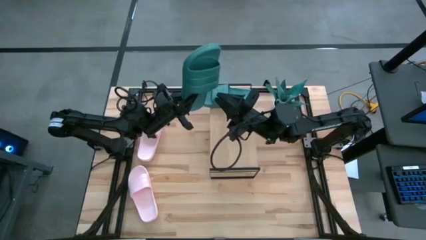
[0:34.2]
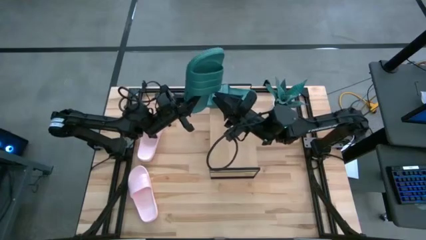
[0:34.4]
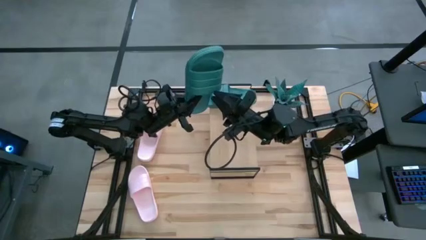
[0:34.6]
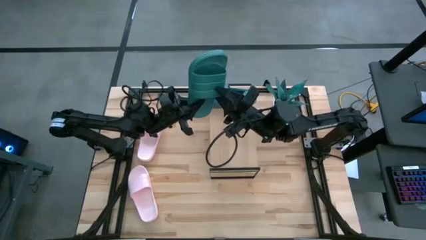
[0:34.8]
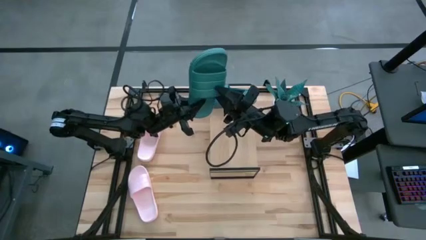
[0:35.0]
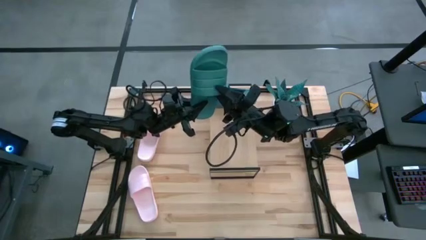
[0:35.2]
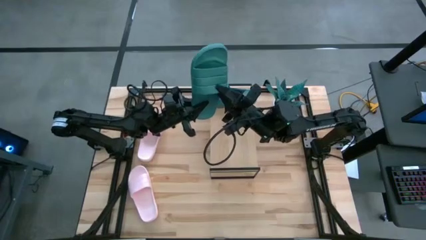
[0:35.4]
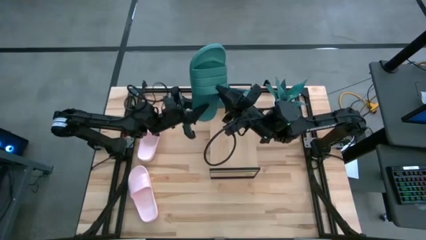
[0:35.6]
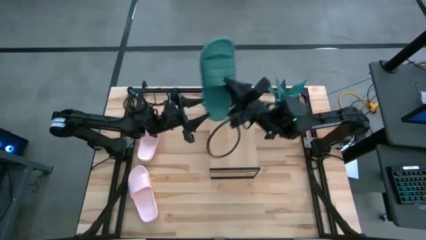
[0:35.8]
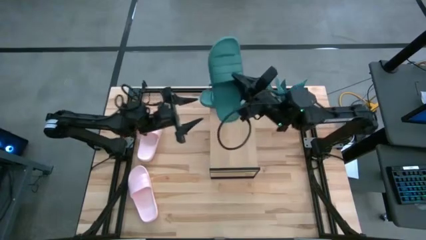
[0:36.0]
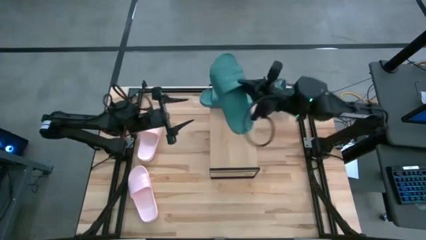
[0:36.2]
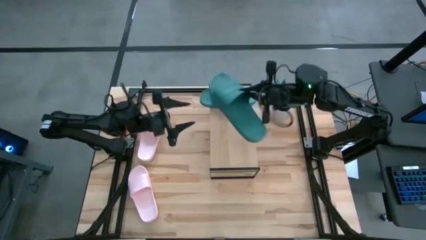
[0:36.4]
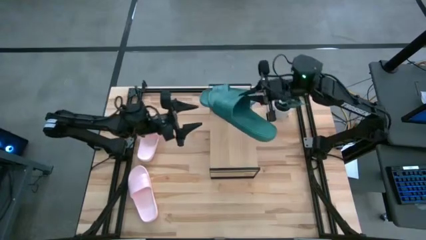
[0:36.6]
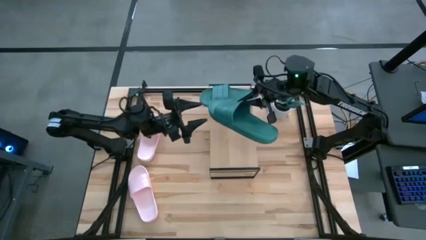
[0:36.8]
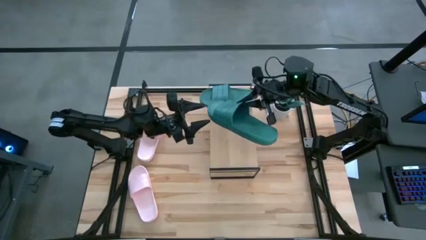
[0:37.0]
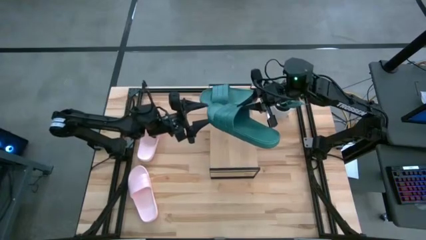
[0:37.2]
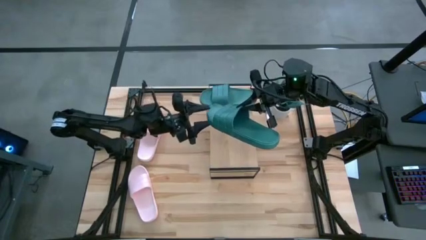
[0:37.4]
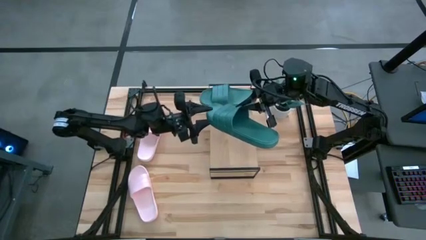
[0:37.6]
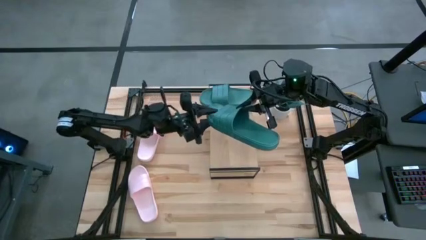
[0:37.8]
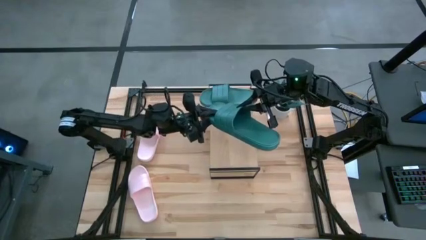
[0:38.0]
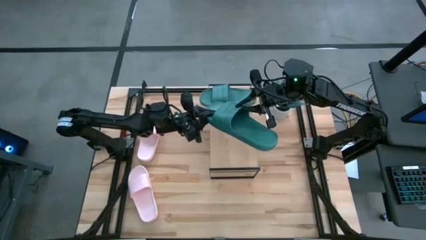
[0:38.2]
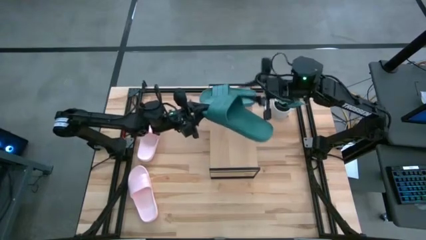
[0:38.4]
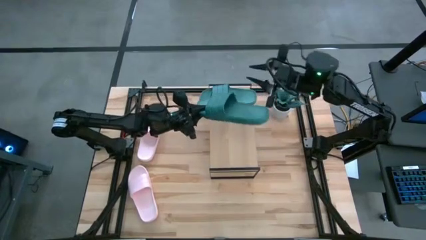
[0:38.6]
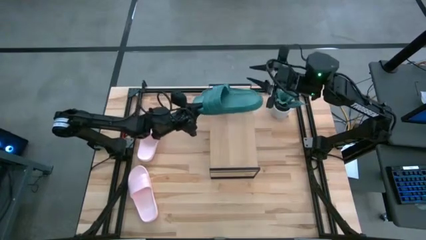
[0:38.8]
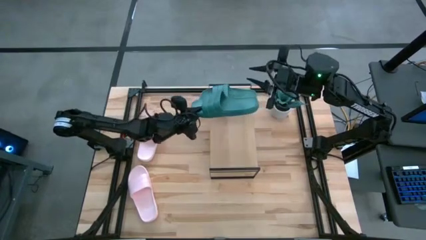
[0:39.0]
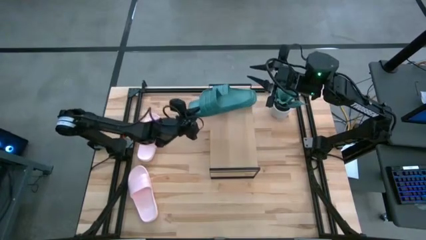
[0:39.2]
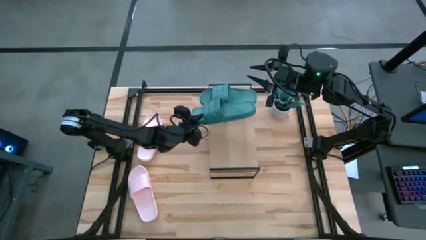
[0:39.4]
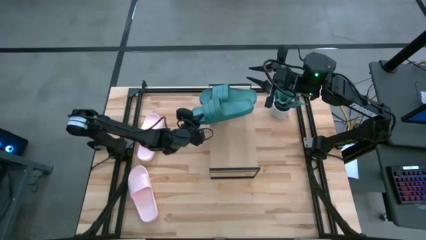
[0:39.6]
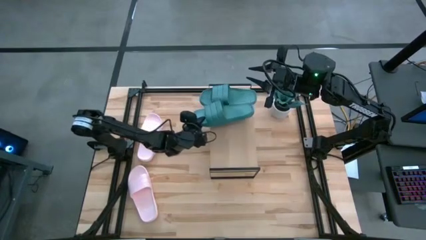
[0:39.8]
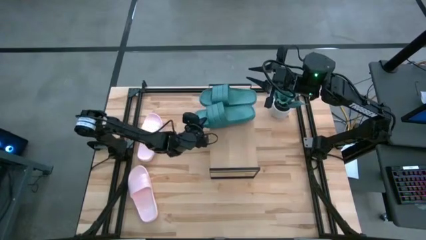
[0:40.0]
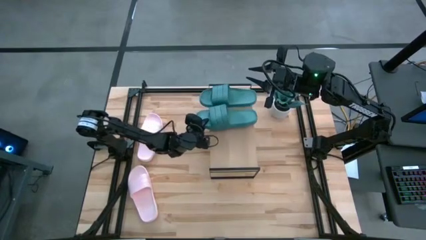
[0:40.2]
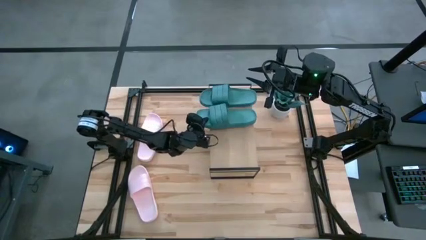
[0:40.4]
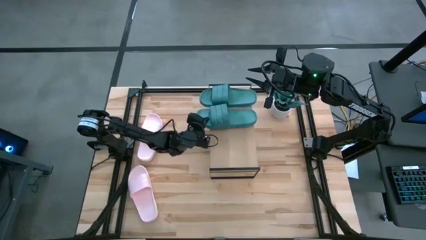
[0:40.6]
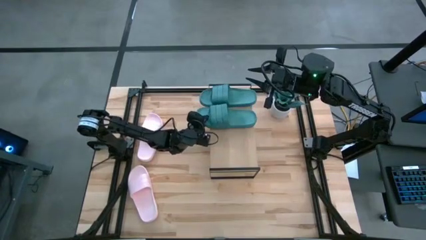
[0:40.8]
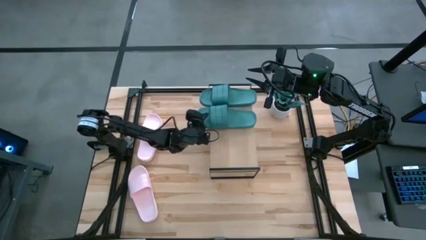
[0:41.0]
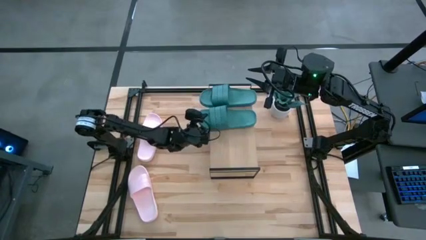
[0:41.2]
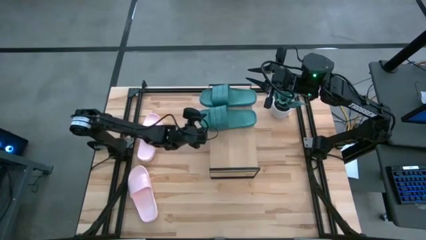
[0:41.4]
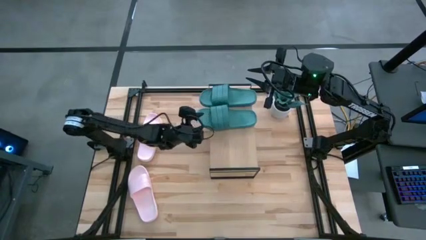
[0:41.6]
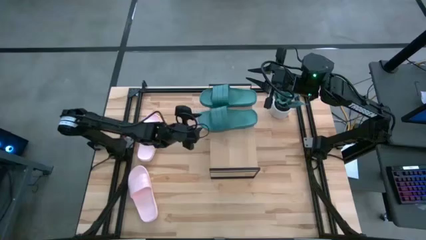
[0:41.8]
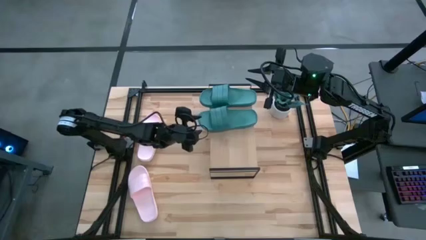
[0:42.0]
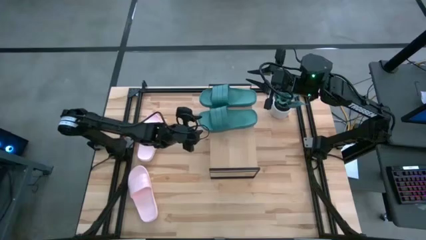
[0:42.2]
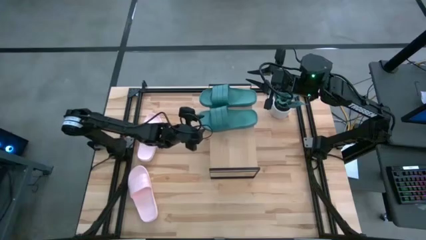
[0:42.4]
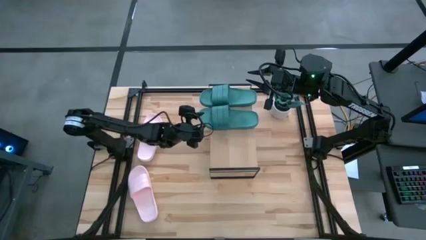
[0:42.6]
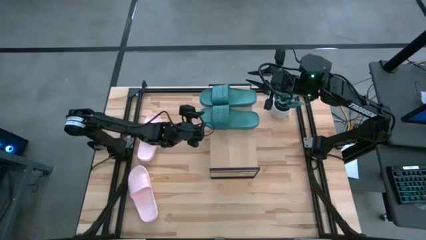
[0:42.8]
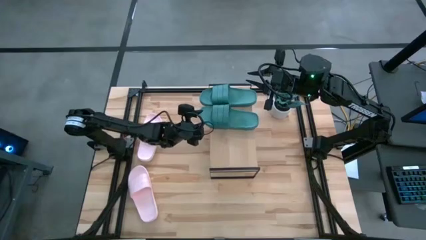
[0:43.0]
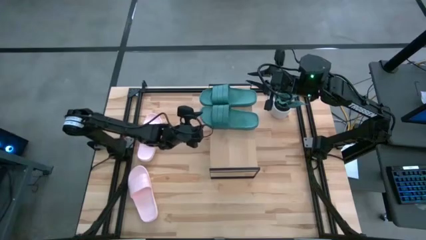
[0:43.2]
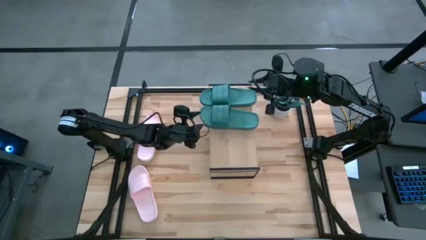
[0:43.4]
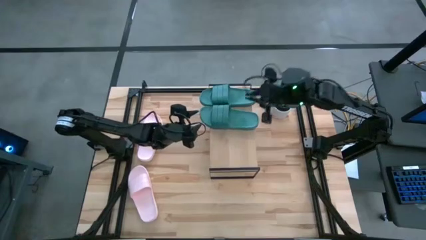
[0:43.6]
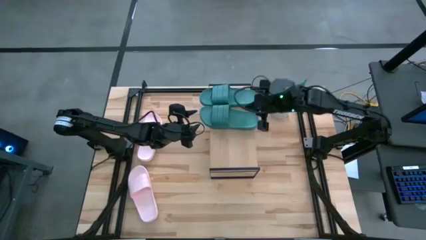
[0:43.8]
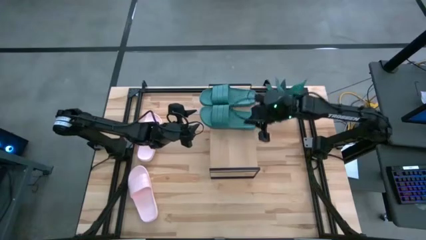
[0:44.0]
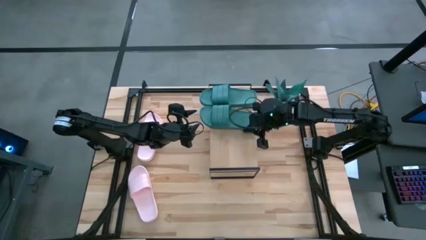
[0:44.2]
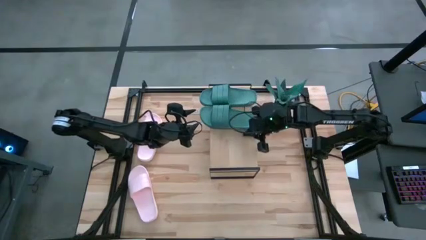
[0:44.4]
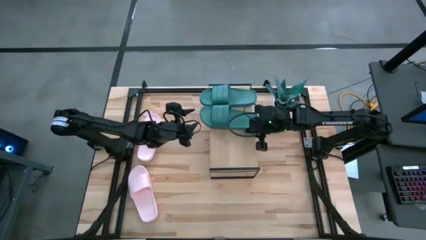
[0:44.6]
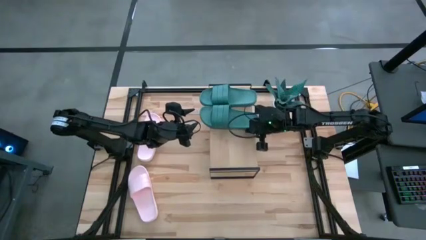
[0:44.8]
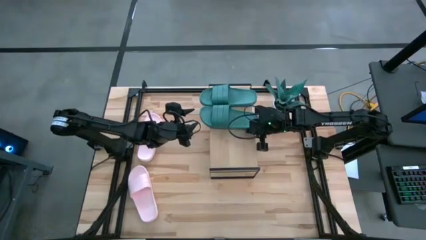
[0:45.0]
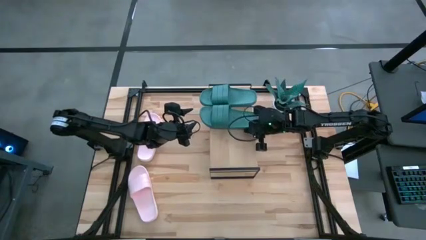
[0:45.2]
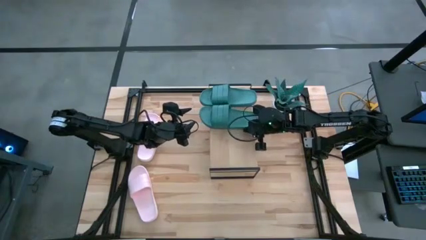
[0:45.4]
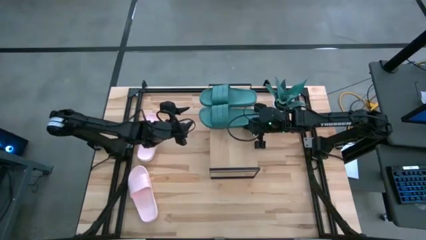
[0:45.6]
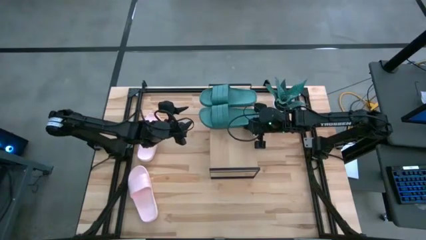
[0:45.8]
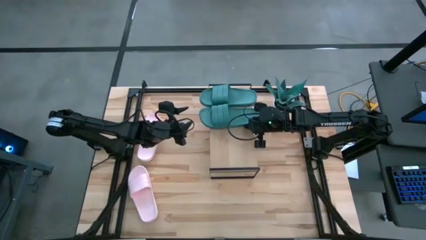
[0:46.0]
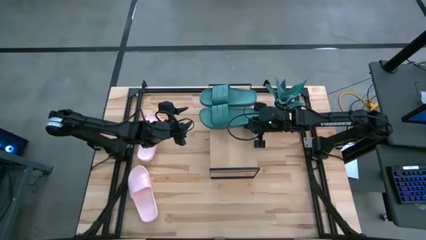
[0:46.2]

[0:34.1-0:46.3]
Task: Pick and place slides into the shelf
Put the left green slipper on the shelf

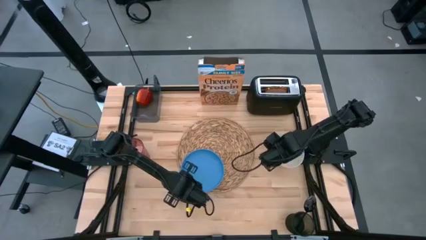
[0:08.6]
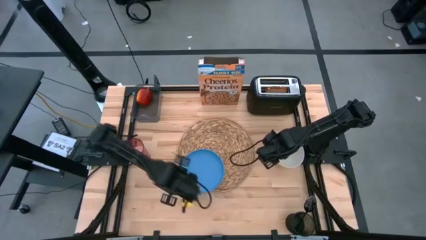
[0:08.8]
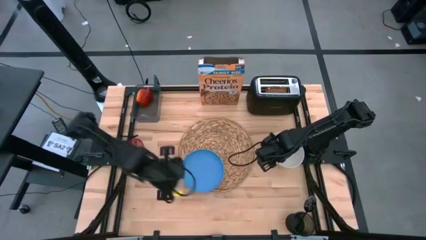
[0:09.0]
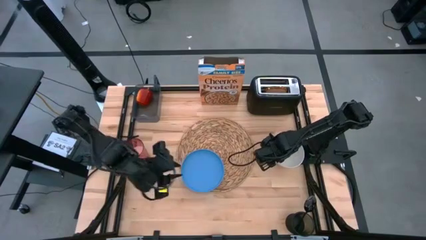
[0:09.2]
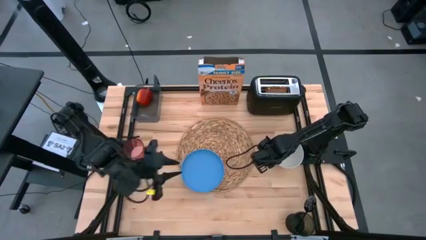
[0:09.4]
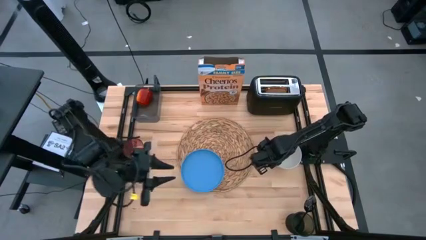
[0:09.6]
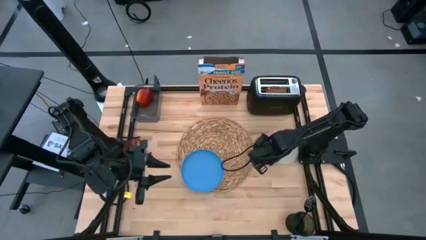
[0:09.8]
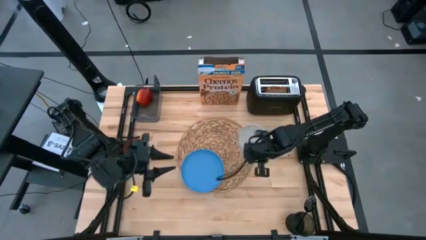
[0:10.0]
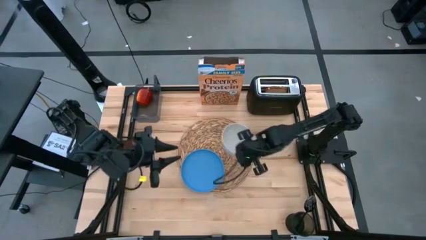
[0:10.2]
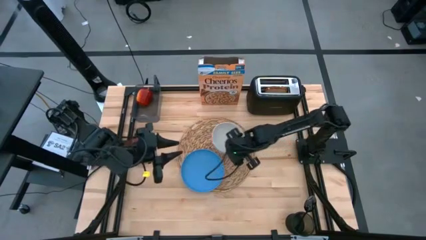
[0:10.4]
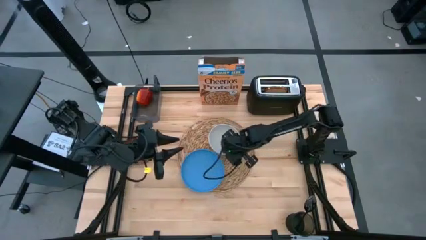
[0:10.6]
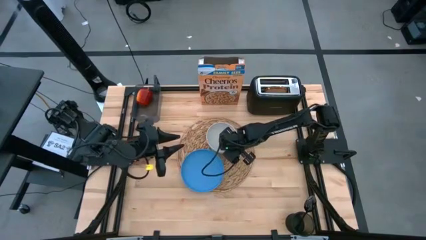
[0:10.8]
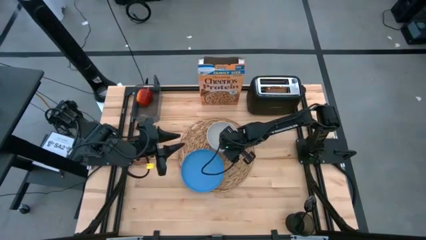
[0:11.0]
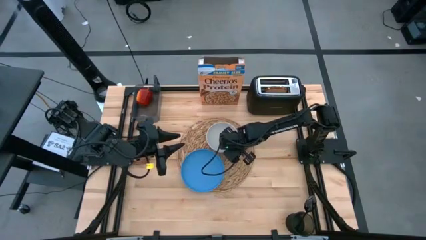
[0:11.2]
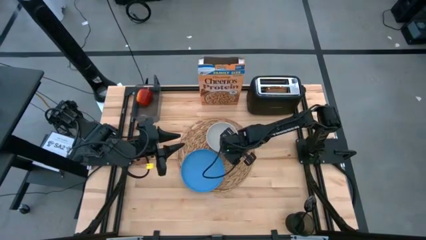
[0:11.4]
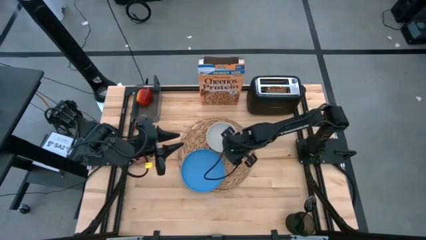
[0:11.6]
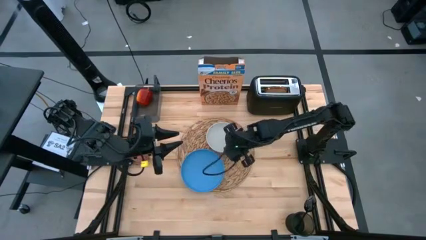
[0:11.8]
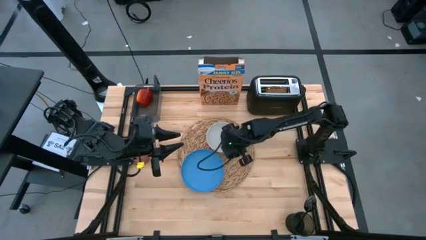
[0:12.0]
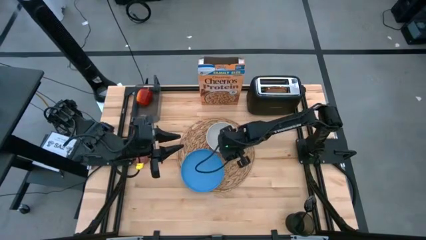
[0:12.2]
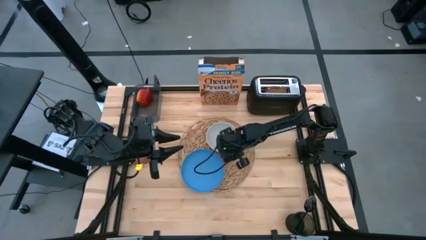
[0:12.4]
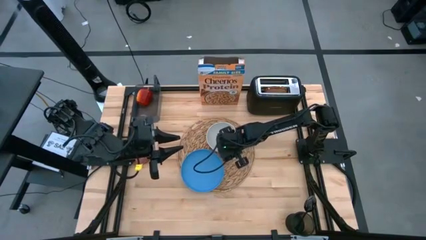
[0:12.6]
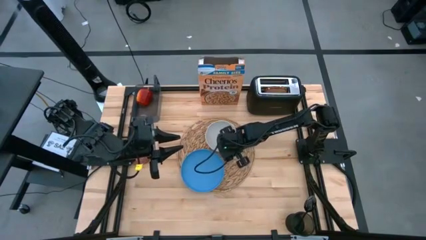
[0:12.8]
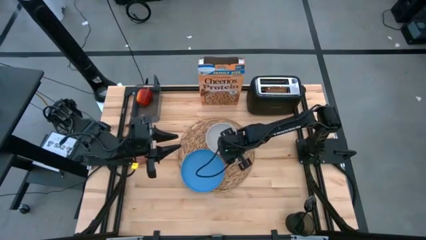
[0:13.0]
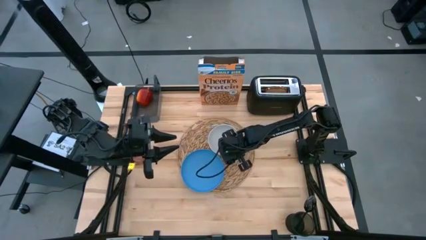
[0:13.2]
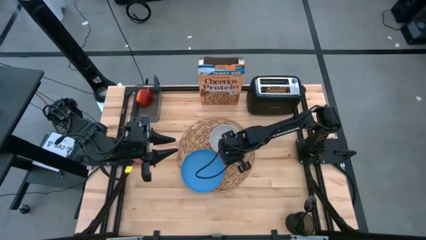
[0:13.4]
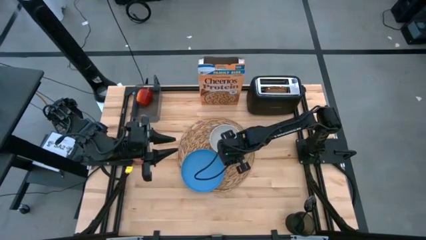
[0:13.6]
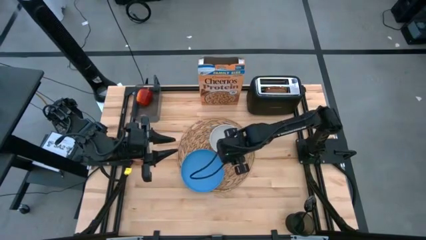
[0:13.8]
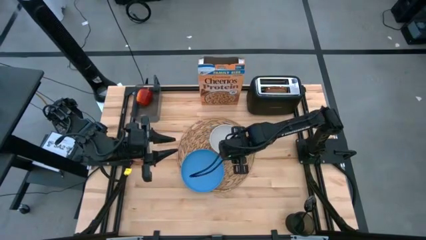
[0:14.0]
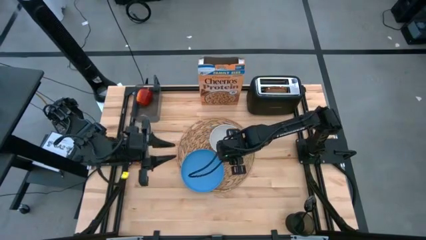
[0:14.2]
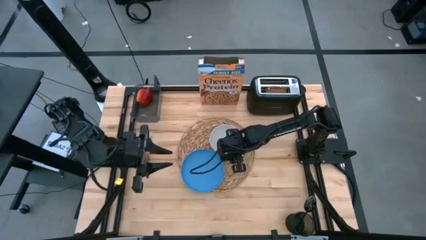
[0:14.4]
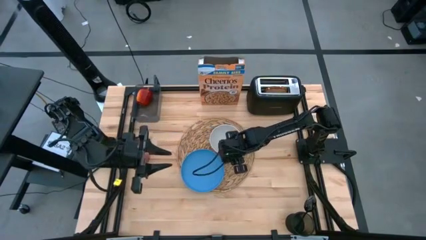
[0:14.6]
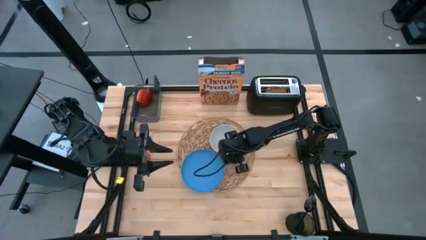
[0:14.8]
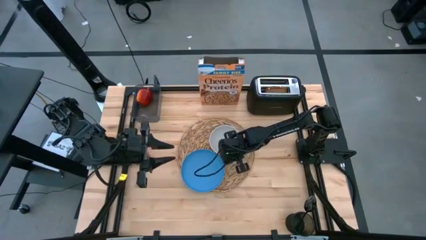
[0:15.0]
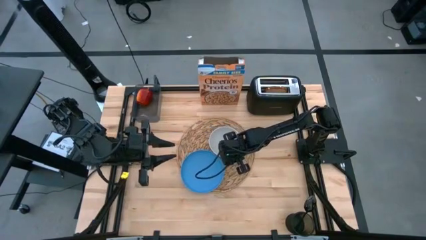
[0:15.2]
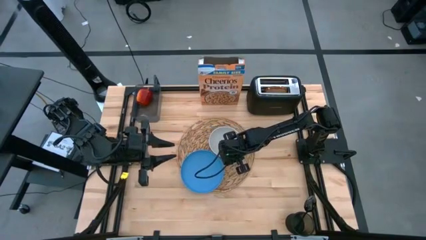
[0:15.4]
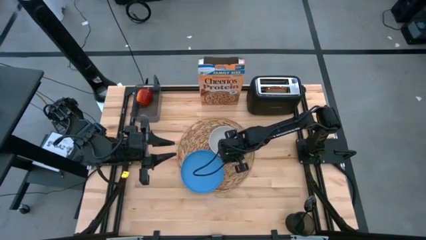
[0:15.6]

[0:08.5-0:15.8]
Task: Arrange a breakfast setting
Put the white bowl on the brown table mat
